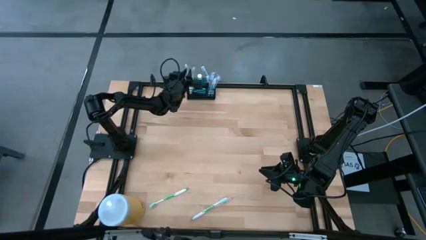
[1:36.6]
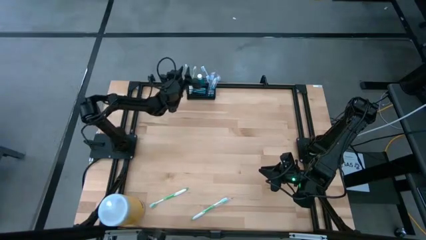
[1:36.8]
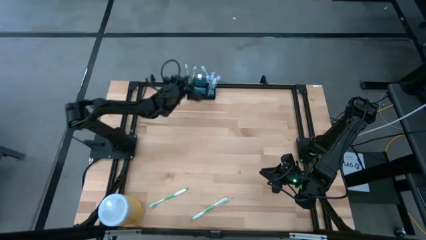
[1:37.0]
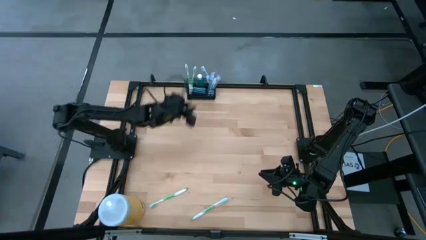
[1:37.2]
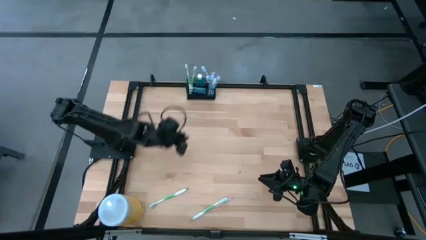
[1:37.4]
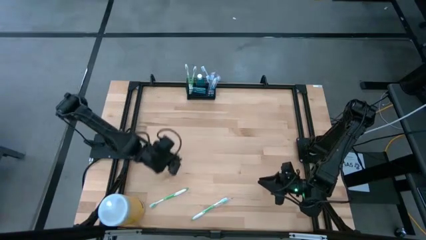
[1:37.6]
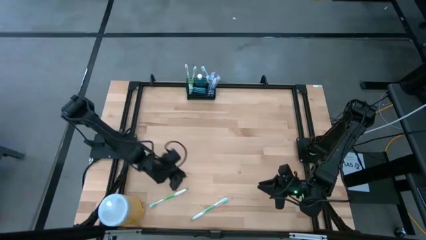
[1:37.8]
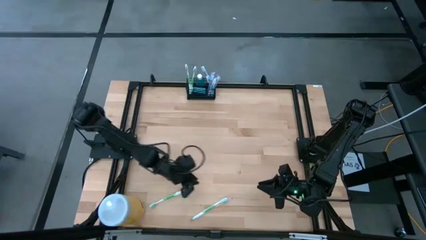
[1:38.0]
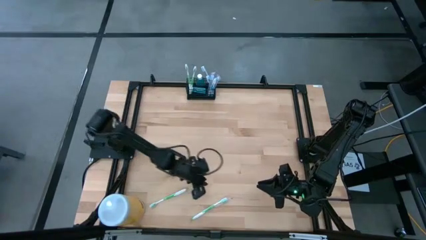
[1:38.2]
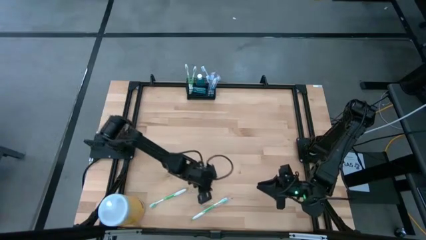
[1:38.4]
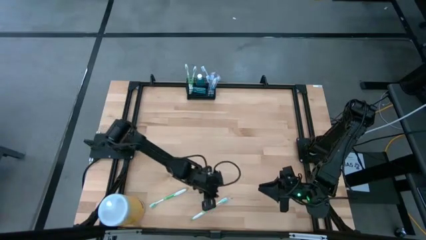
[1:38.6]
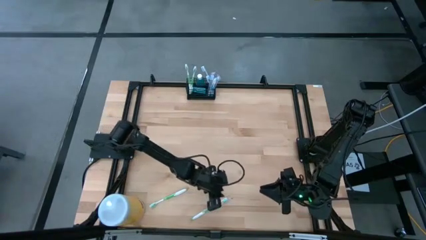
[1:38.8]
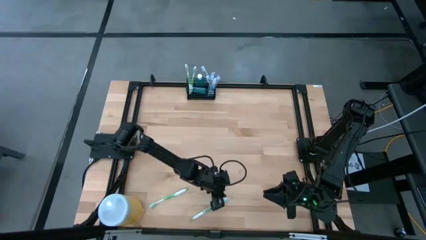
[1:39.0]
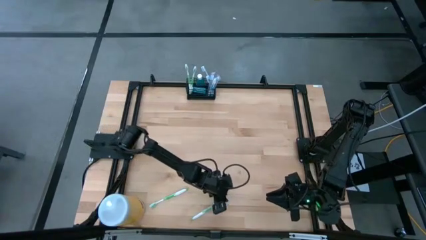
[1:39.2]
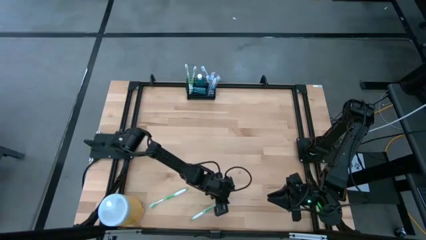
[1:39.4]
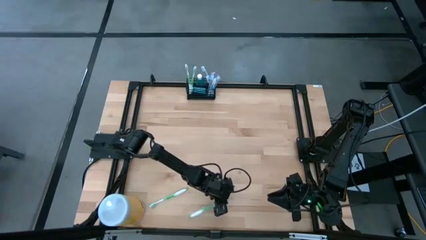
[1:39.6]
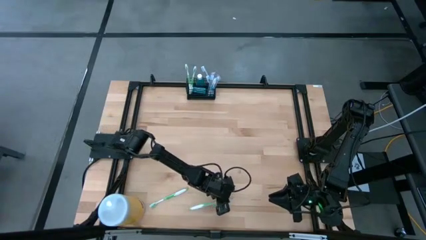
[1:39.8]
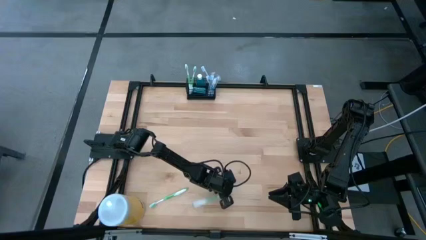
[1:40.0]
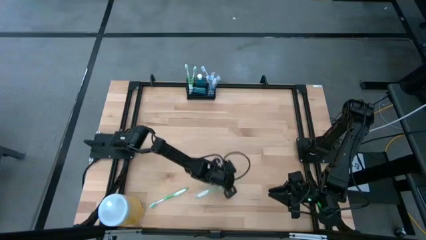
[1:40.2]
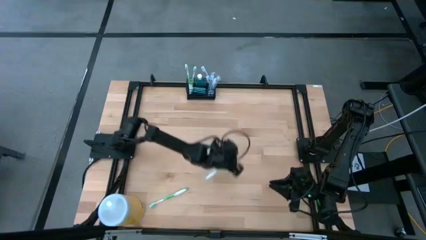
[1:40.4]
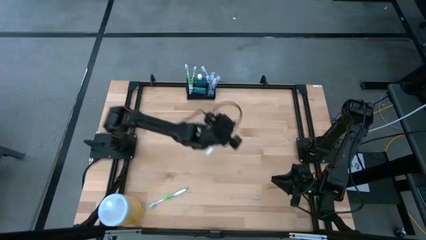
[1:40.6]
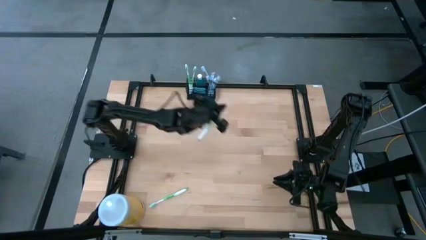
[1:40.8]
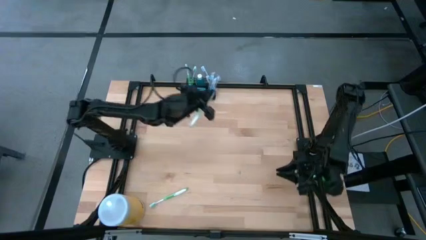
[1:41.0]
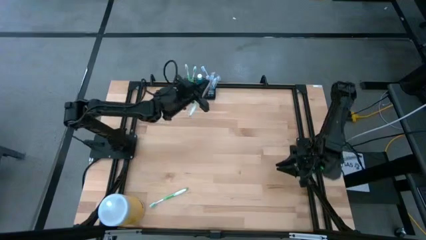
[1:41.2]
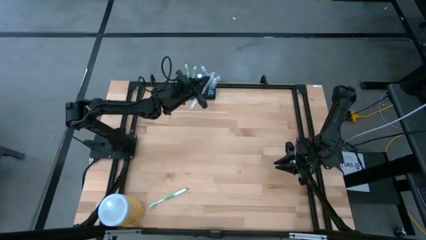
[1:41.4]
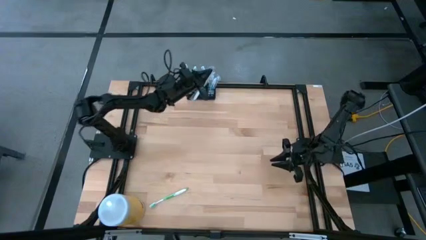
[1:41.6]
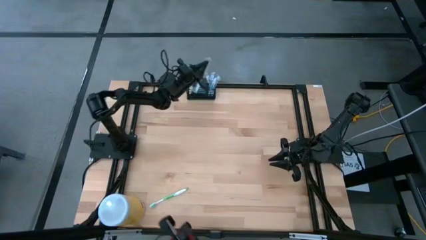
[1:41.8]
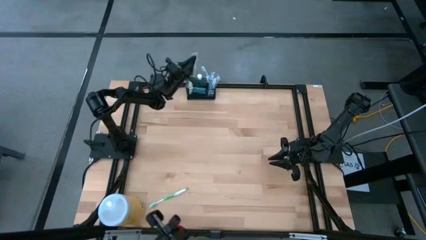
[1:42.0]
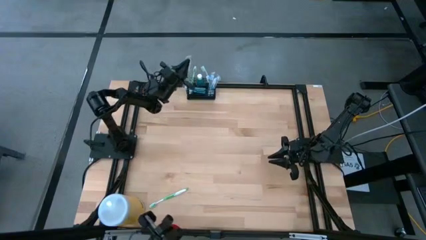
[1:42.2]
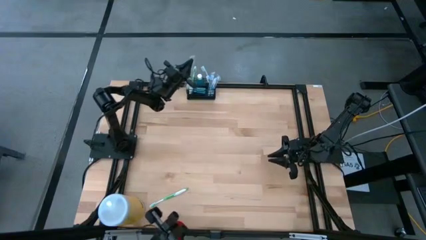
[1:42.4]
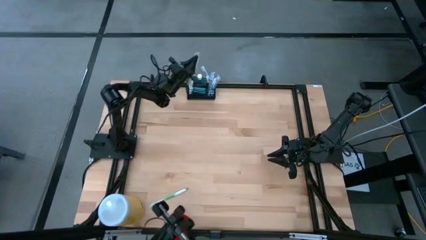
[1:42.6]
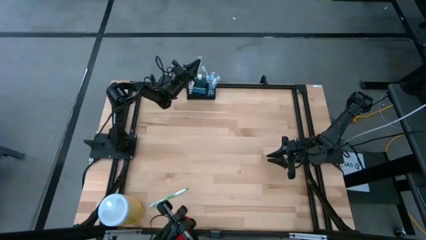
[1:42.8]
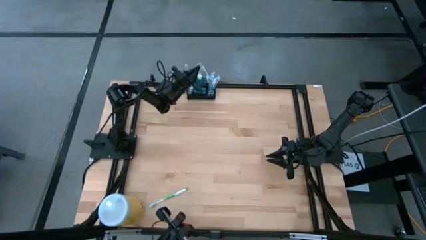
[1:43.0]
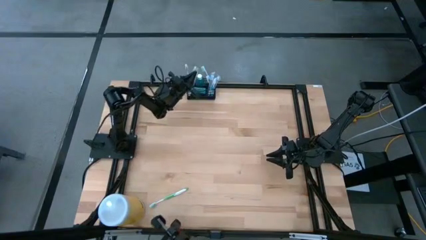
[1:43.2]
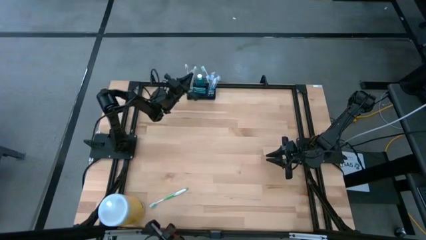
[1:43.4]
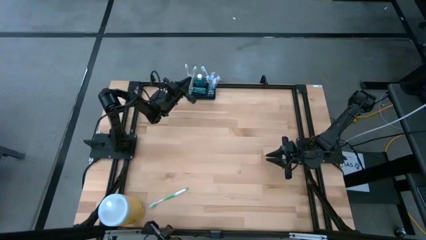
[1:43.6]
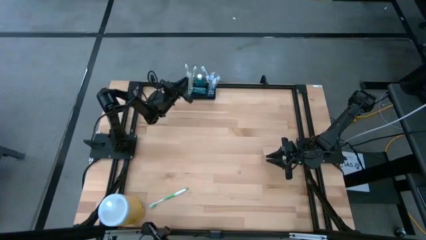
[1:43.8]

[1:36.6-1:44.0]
Task: Pick & Place toothbrushing station
Put the green toothbrush into the wire organizer

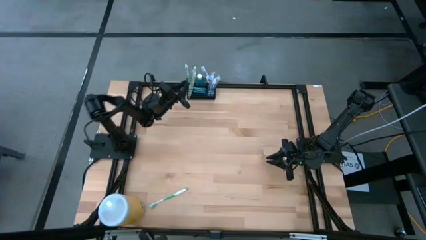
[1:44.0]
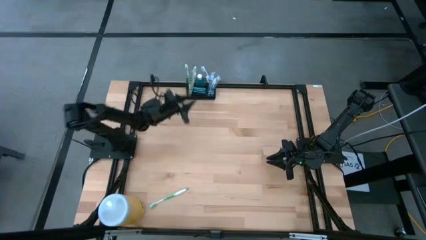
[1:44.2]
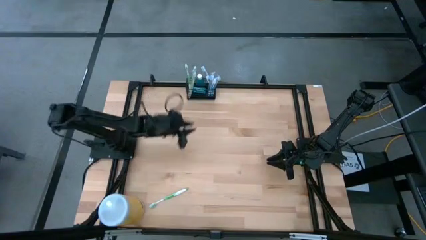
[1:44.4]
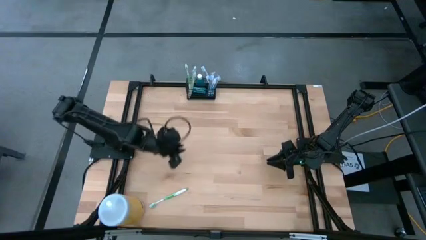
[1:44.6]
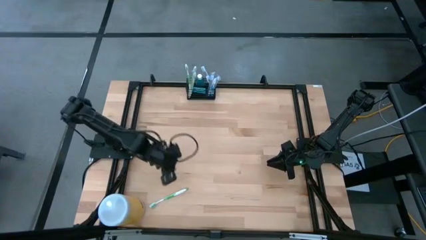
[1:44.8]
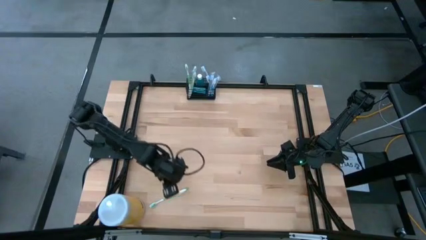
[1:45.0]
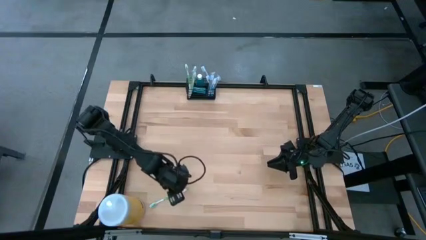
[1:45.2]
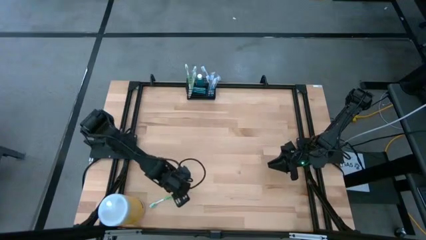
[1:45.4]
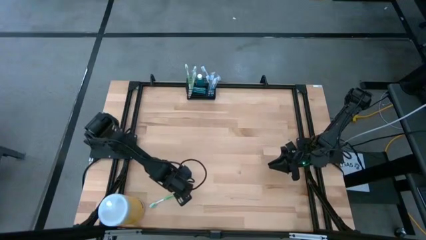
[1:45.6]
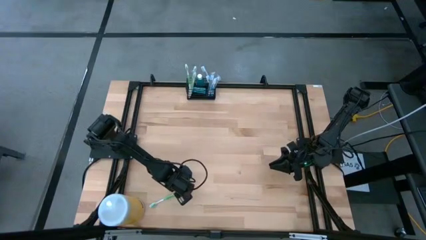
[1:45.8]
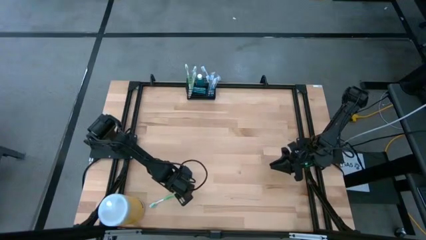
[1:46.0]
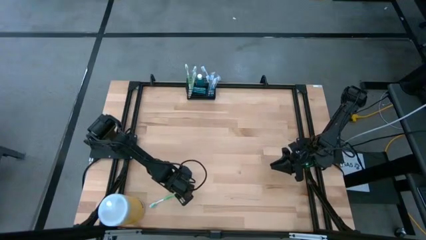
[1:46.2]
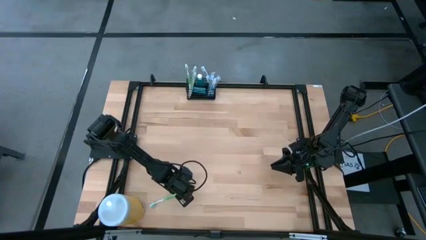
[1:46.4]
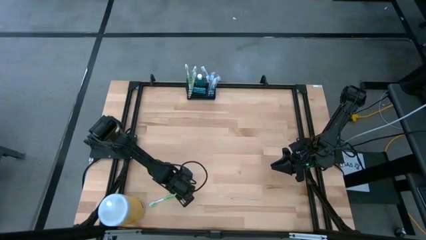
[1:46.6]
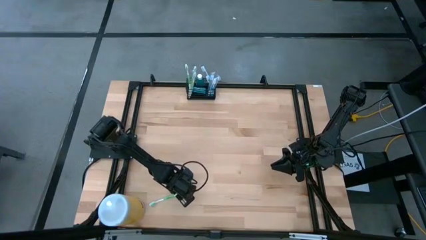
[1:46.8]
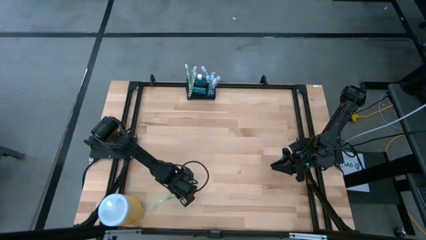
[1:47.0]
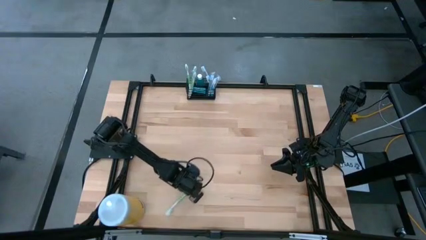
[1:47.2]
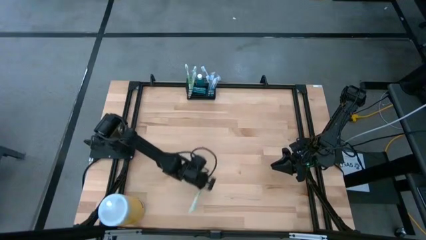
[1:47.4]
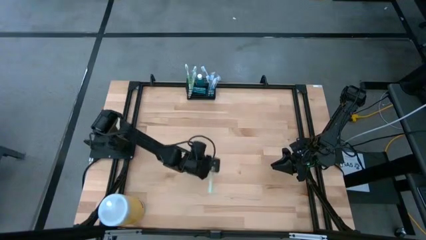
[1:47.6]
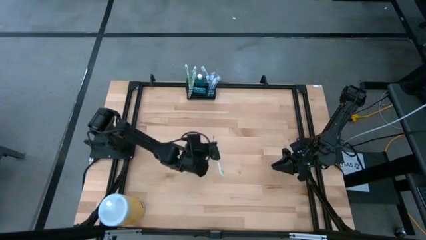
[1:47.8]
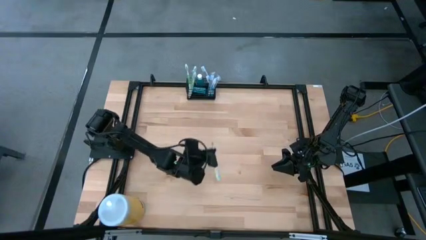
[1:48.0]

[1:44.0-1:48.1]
Put the green toothbrush into the wire organizer

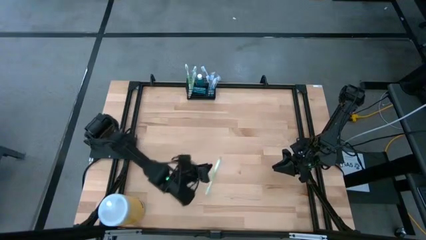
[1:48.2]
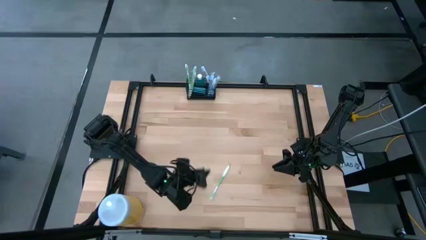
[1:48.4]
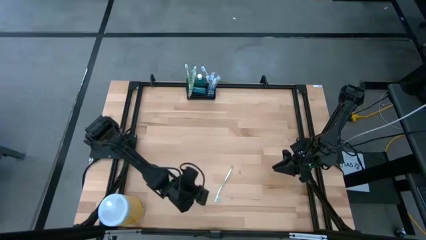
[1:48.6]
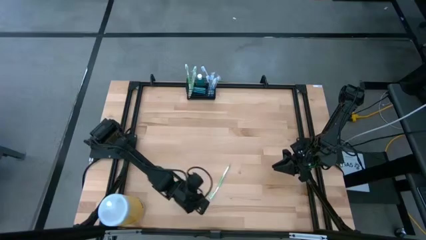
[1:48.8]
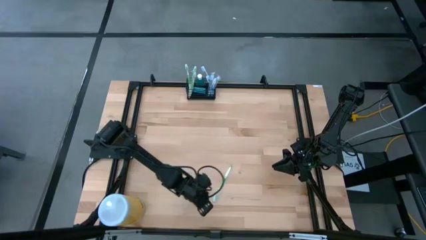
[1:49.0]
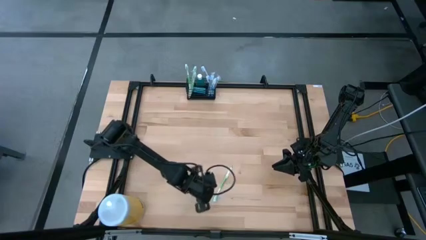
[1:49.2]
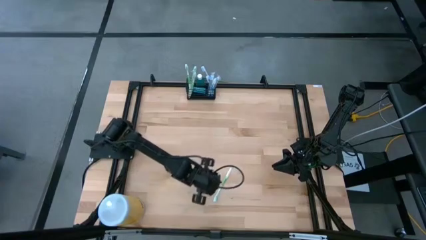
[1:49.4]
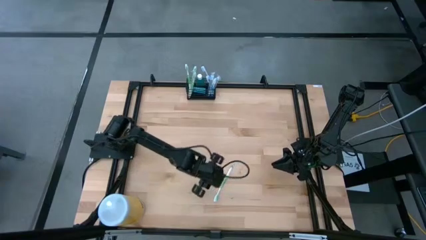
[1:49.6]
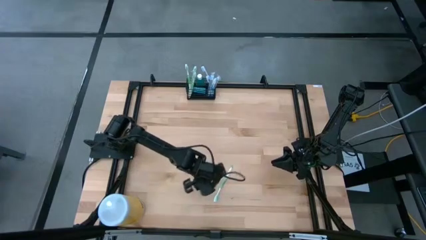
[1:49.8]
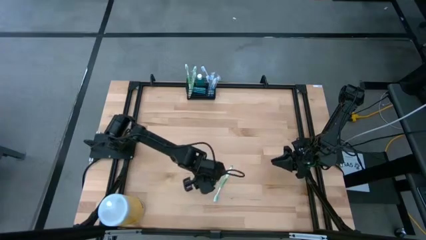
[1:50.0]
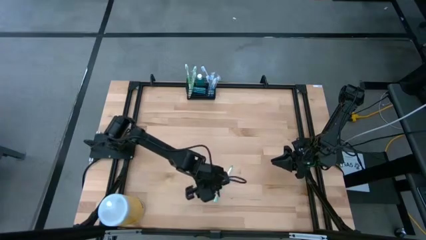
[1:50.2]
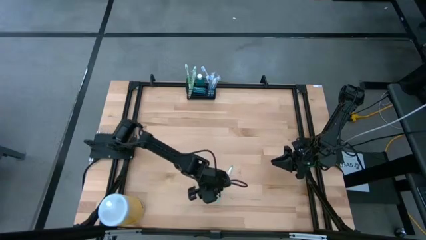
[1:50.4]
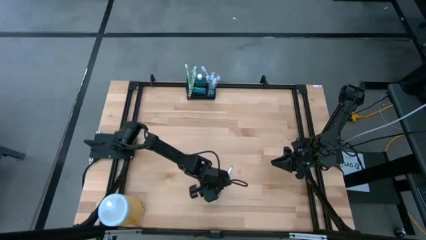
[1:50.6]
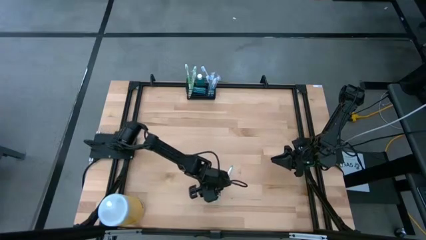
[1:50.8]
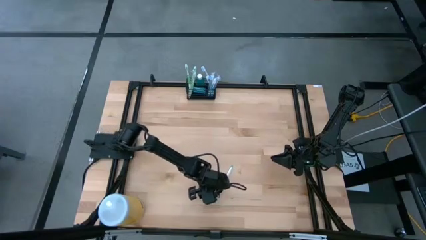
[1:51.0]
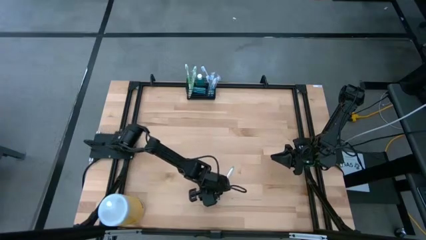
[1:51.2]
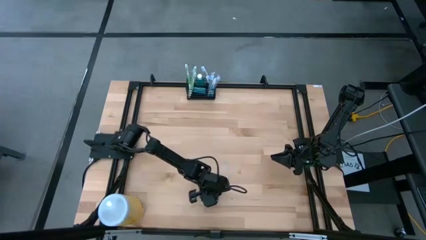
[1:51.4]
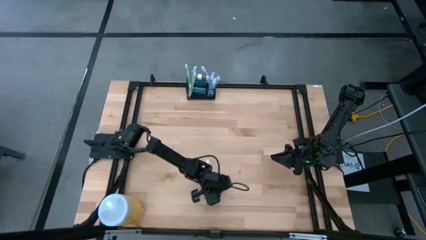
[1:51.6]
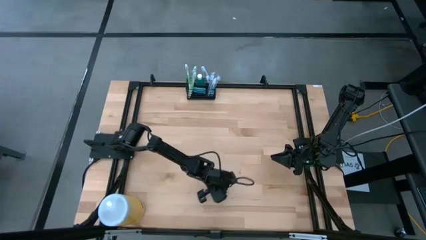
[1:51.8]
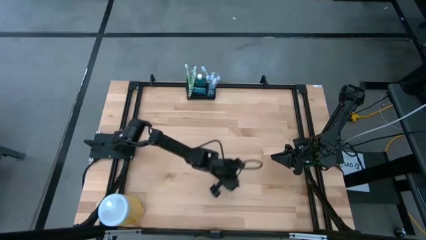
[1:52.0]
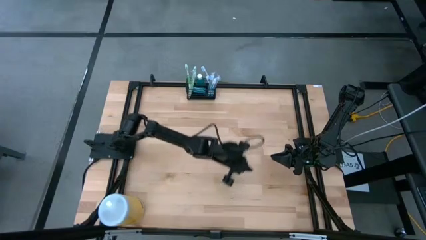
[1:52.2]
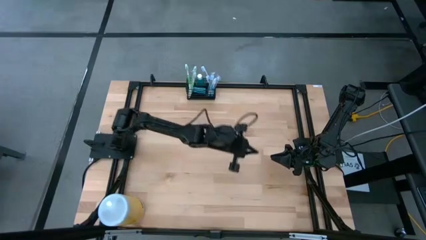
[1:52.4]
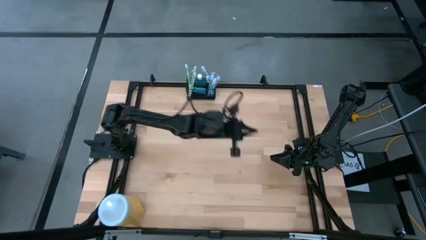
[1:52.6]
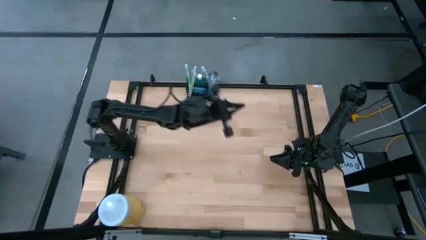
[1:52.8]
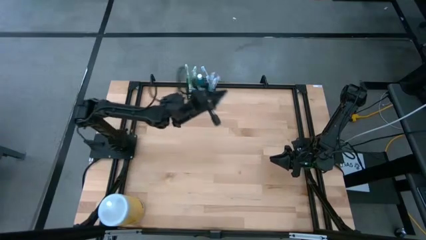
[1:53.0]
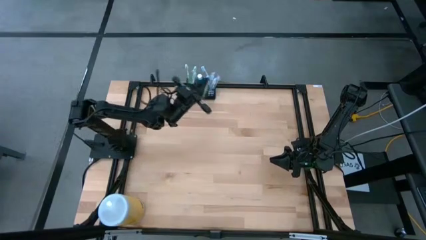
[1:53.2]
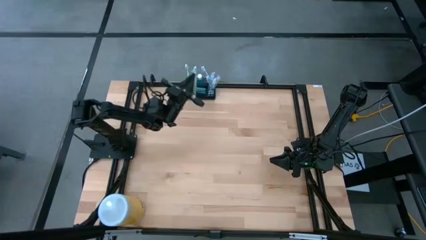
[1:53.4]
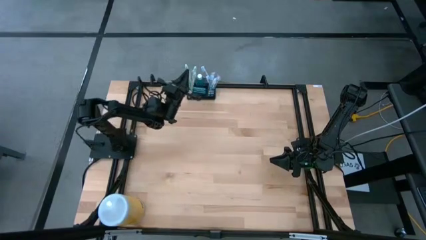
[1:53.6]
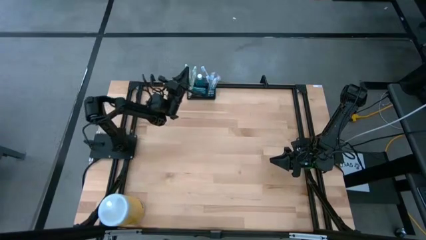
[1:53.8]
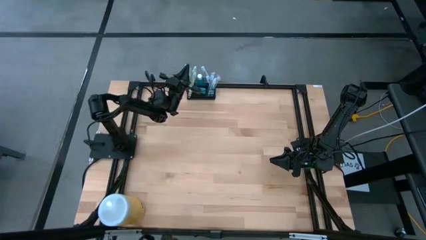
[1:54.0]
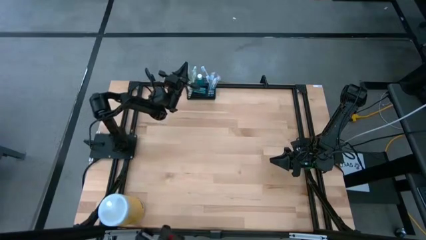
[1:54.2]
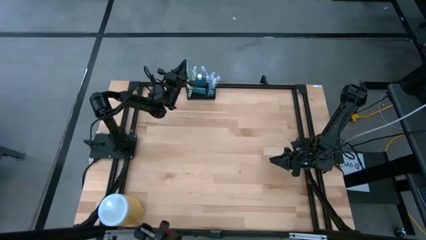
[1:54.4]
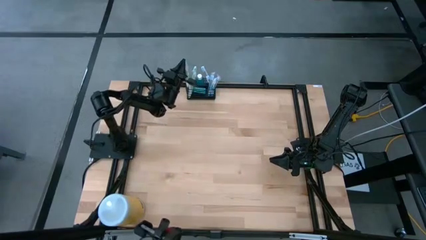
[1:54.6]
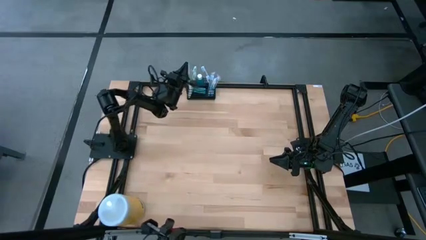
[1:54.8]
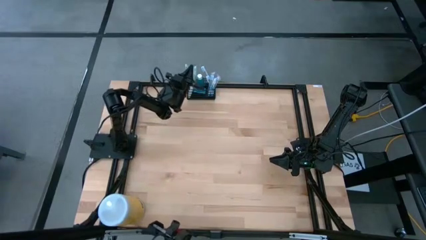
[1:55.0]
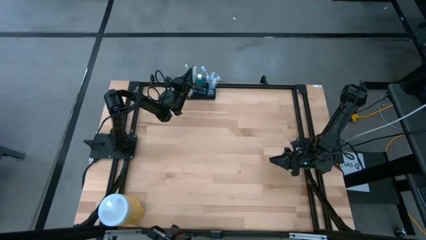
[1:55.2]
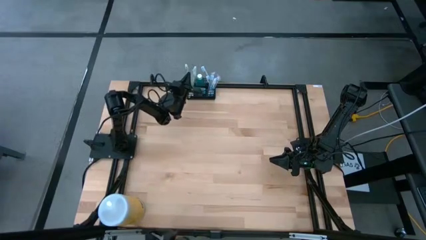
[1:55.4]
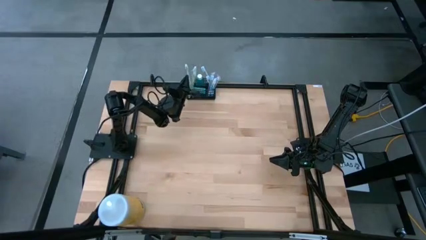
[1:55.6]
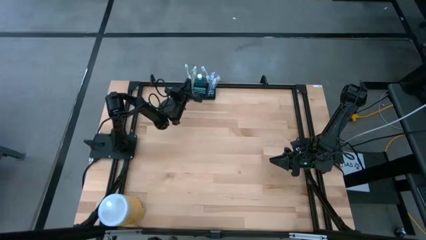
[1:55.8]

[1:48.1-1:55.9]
Put the green toothbrush into the wire organizer
